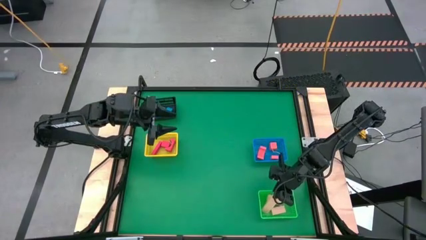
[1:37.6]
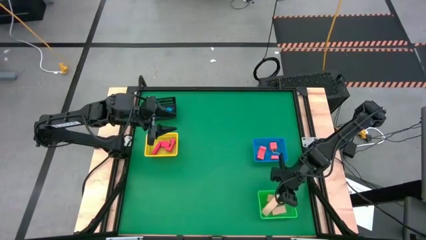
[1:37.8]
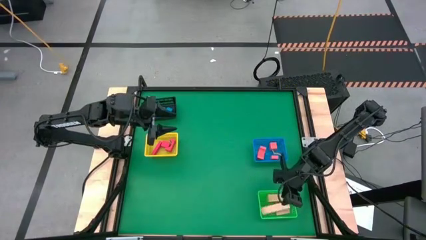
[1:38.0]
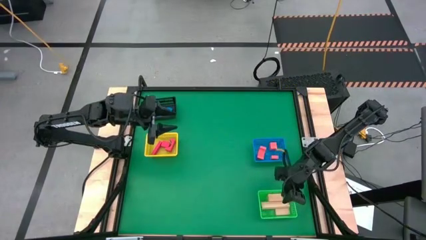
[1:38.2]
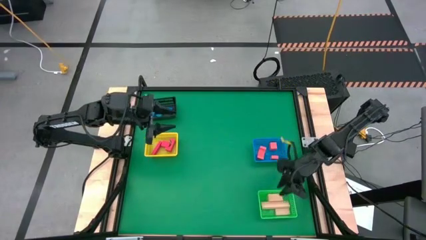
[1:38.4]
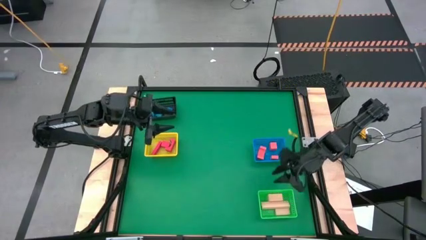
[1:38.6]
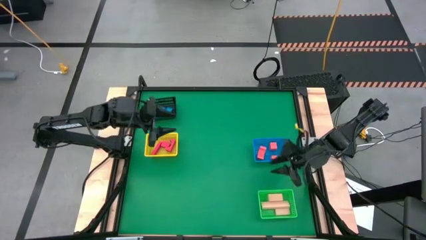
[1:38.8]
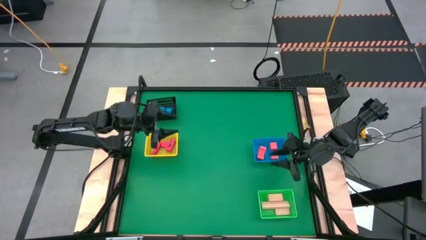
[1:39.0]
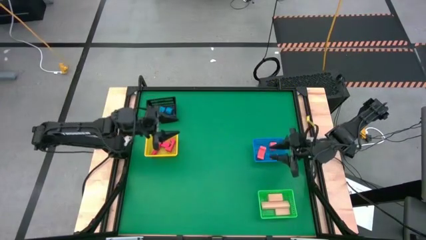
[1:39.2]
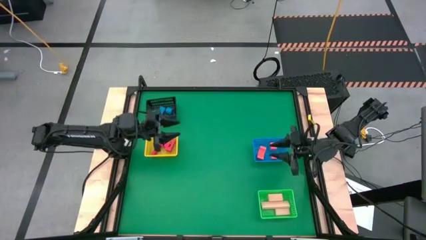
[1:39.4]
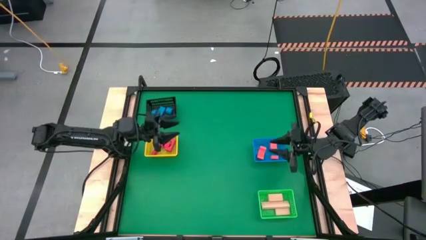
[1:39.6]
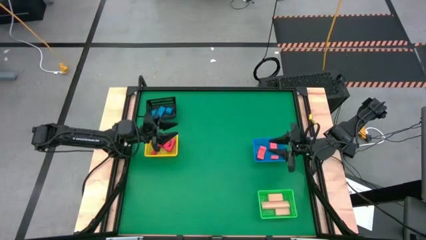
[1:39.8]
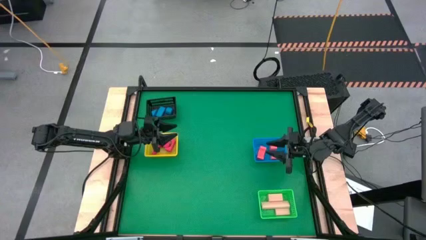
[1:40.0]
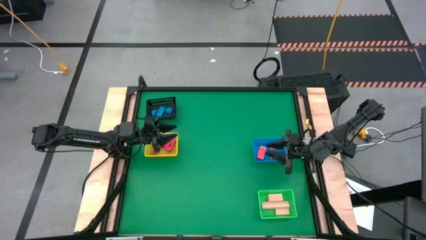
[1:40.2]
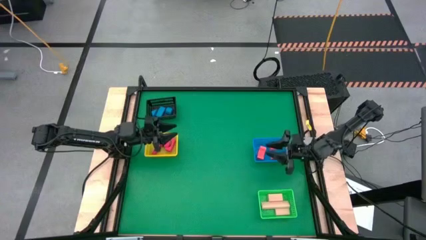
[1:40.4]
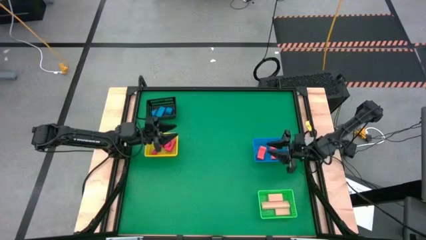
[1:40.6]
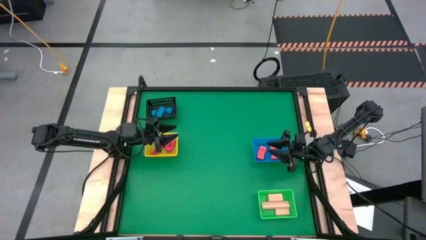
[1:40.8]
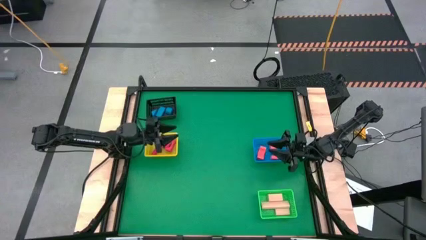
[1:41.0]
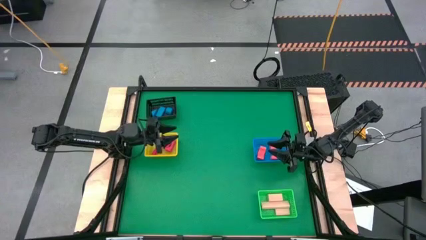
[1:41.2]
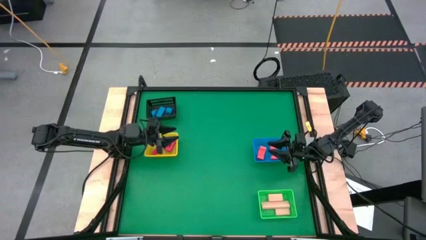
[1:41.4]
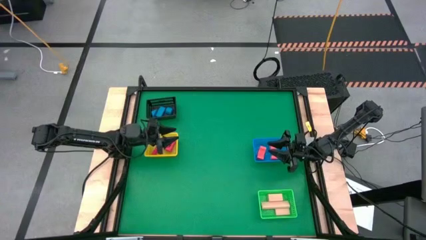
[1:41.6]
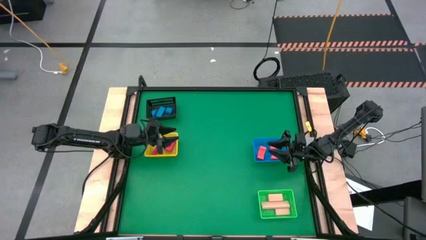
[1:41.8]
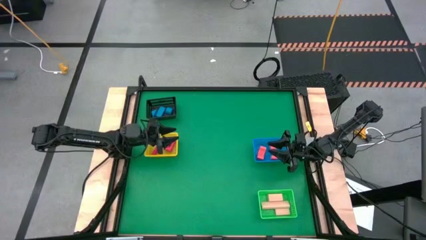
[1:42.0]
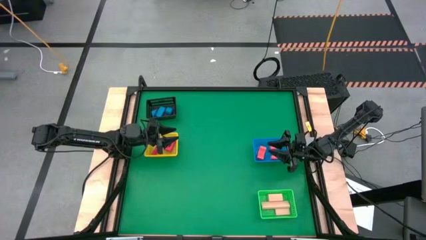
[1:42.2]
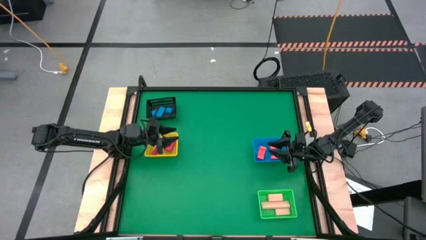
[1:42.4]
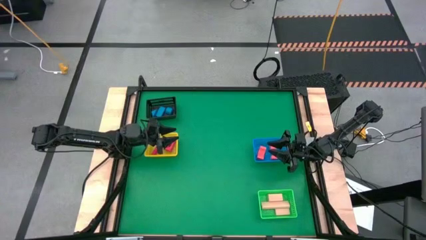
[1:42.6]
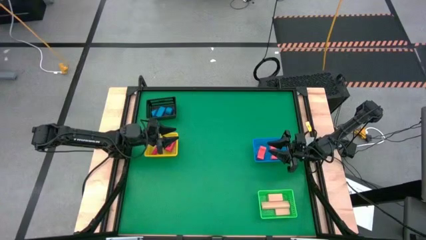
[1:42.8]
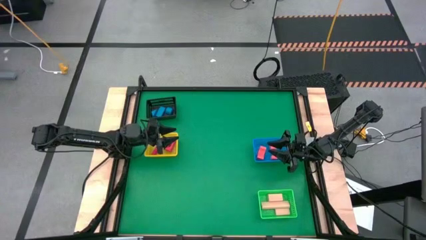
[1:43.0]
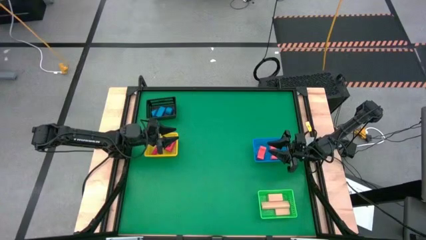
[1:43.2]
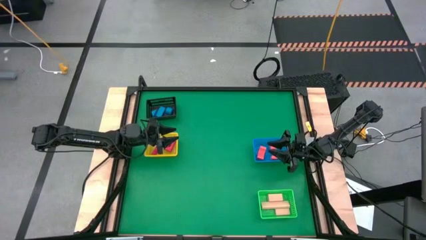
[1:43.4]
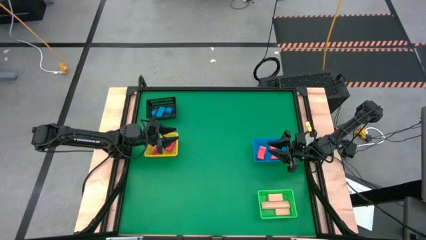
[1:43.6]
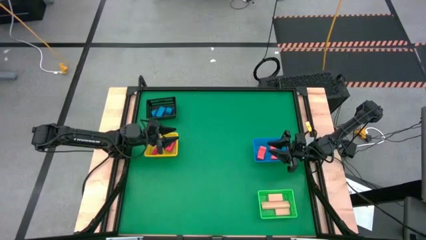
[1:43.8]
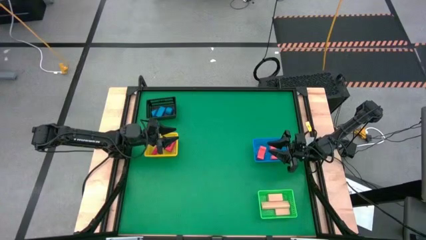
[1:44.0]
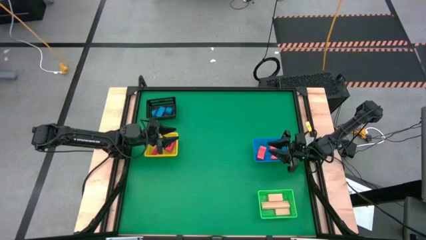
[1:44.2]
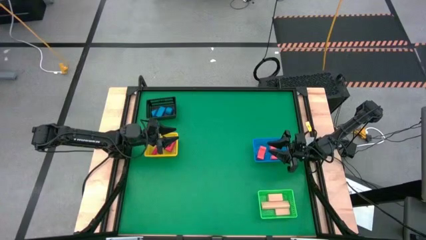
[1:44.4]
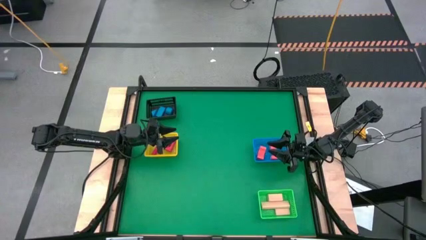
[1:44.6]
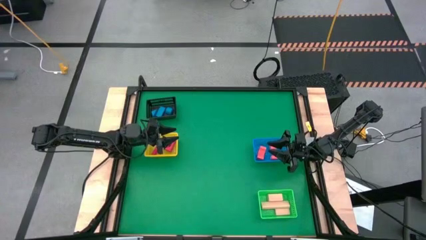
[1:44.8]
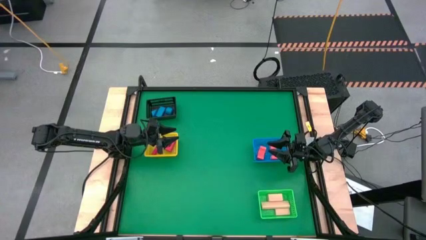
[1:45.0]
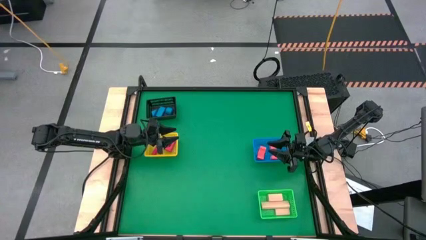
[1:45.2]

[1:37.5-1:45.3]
Task: Sort & place blocks by color
Return to Home Position

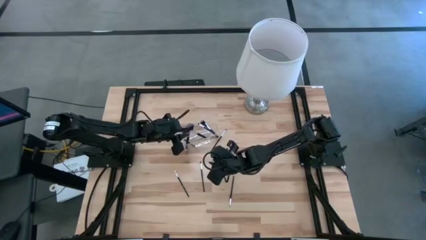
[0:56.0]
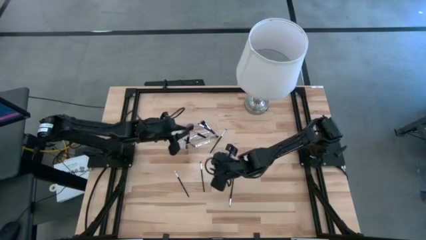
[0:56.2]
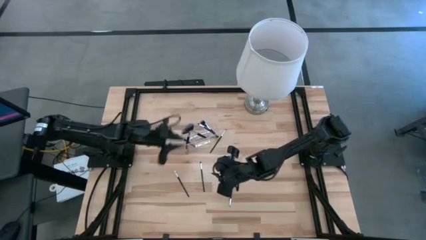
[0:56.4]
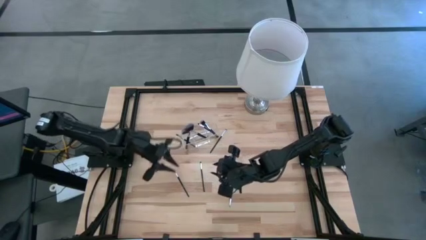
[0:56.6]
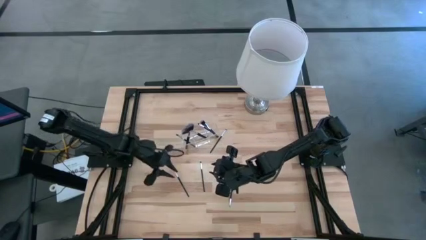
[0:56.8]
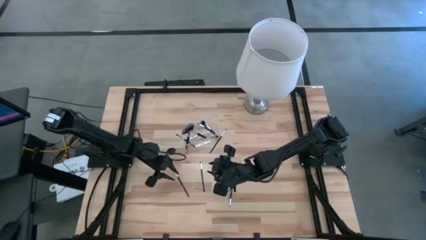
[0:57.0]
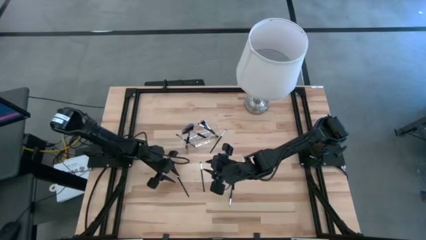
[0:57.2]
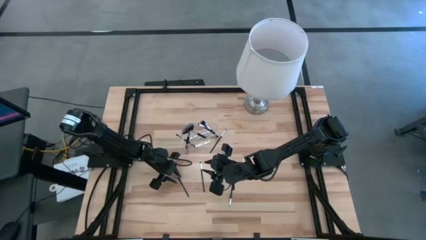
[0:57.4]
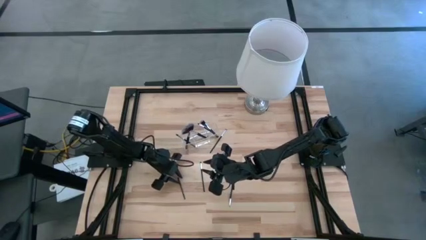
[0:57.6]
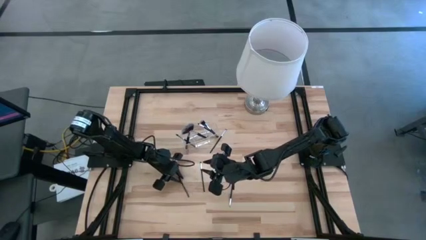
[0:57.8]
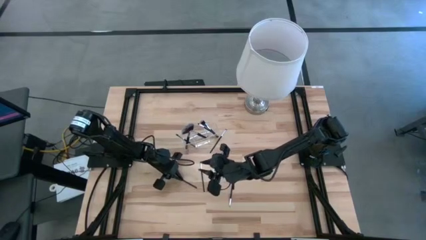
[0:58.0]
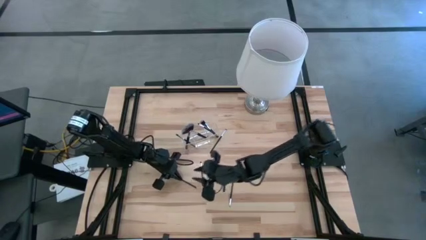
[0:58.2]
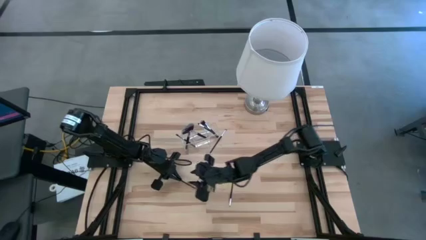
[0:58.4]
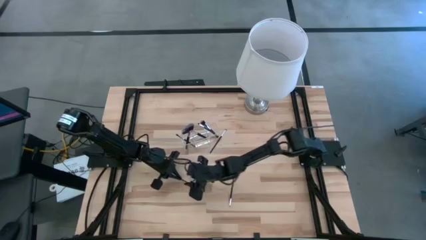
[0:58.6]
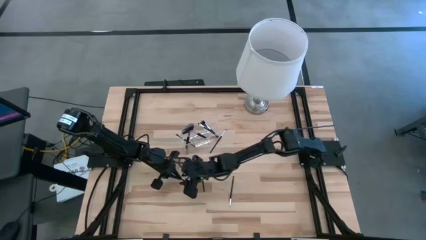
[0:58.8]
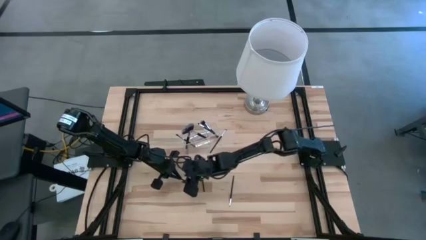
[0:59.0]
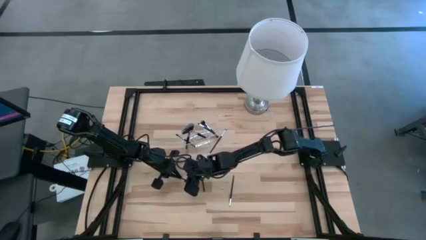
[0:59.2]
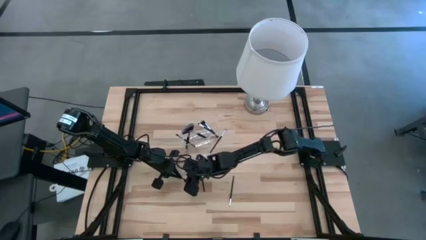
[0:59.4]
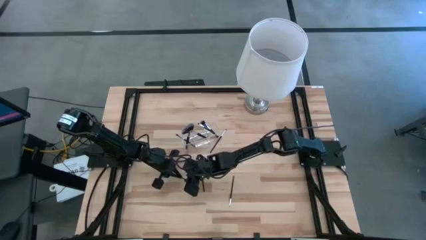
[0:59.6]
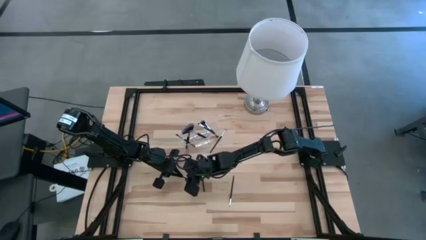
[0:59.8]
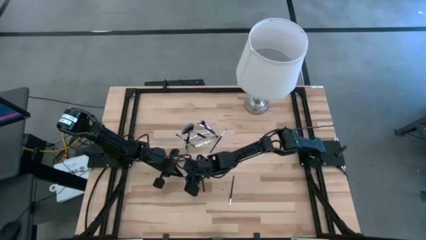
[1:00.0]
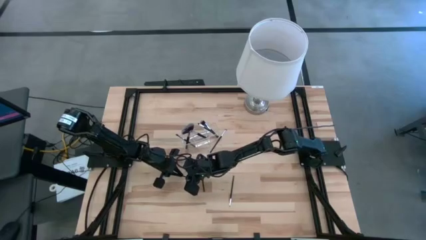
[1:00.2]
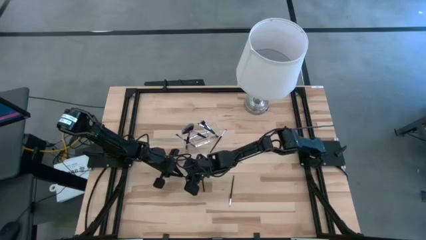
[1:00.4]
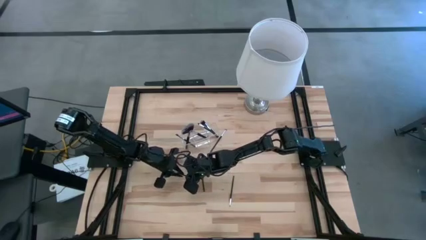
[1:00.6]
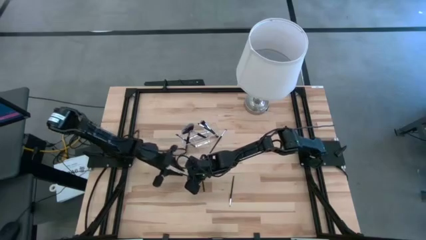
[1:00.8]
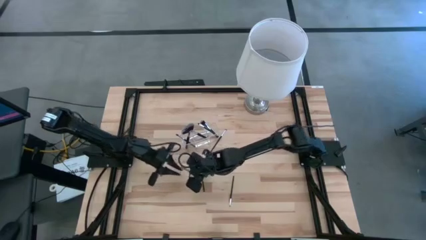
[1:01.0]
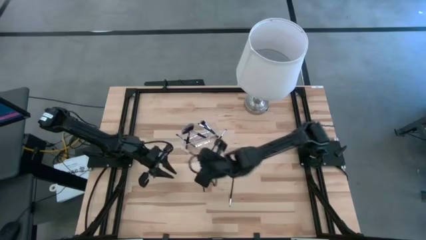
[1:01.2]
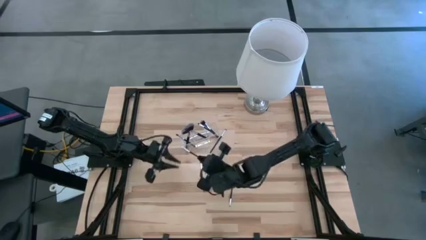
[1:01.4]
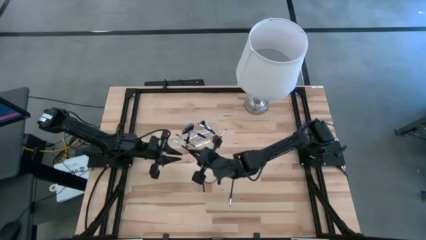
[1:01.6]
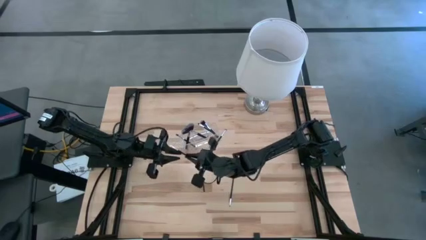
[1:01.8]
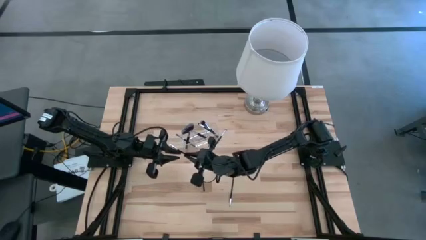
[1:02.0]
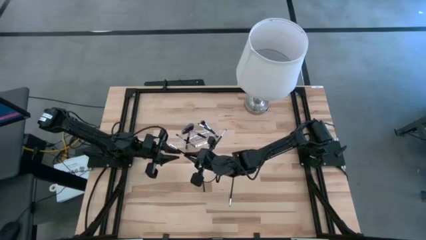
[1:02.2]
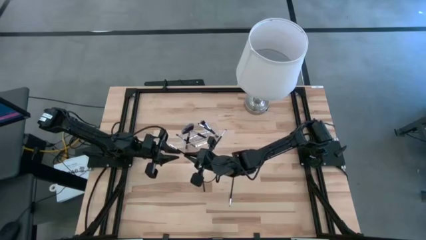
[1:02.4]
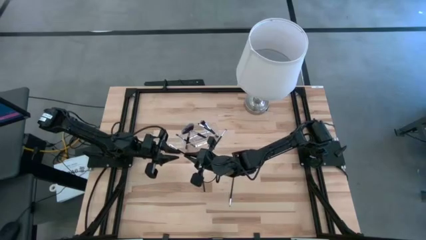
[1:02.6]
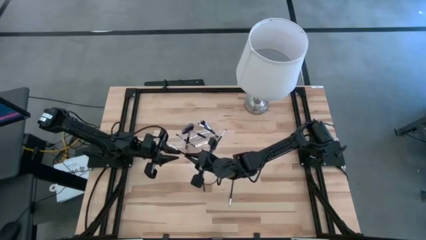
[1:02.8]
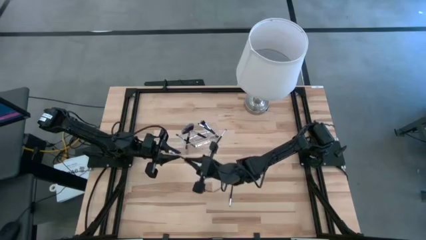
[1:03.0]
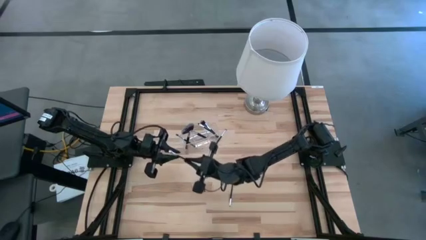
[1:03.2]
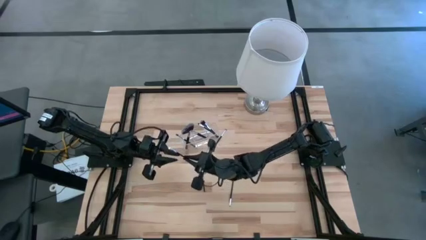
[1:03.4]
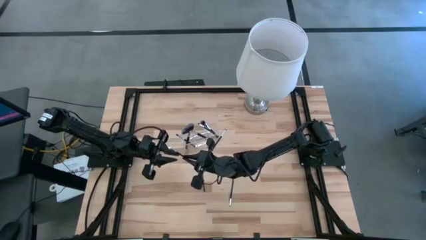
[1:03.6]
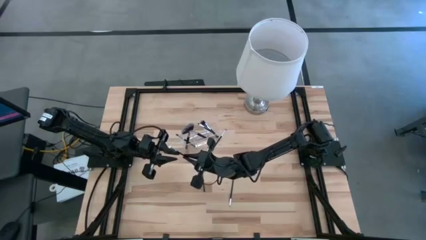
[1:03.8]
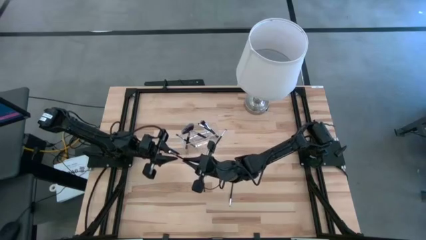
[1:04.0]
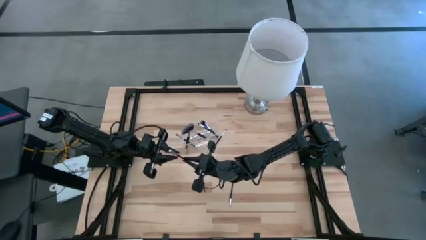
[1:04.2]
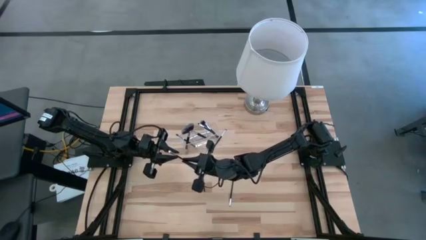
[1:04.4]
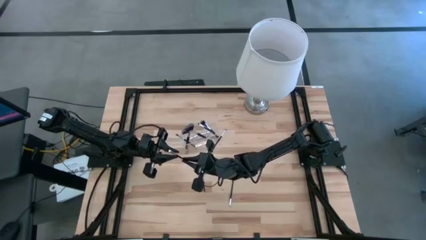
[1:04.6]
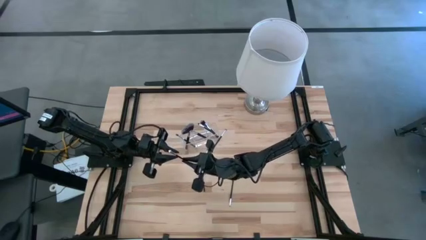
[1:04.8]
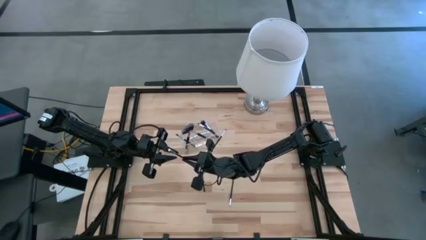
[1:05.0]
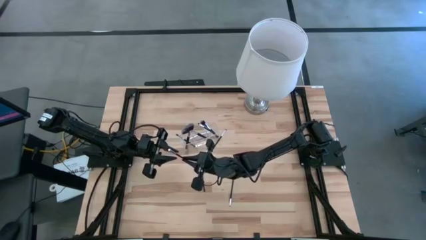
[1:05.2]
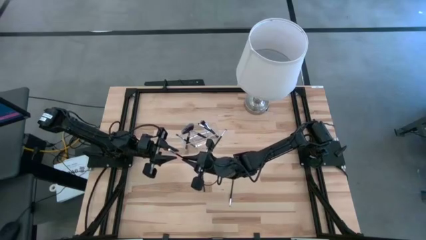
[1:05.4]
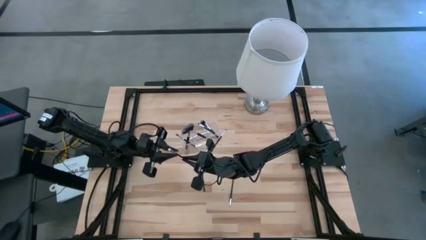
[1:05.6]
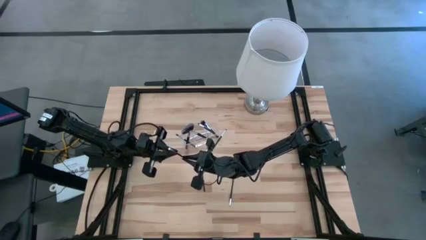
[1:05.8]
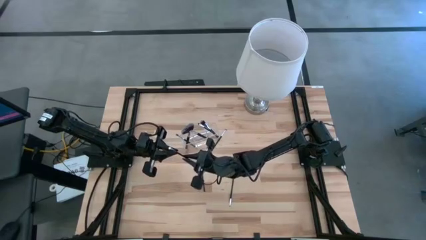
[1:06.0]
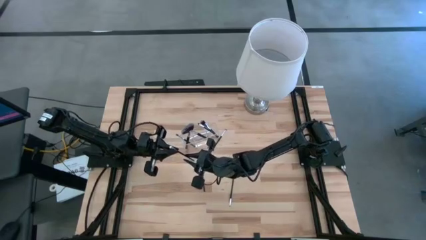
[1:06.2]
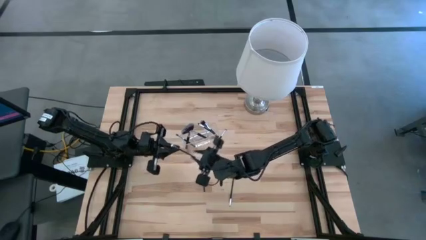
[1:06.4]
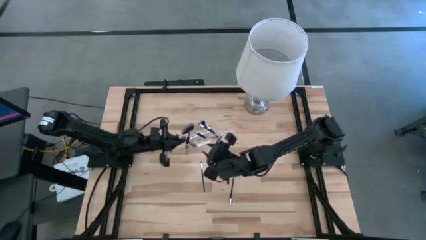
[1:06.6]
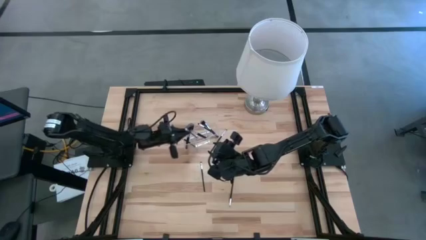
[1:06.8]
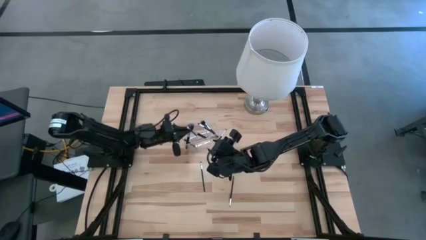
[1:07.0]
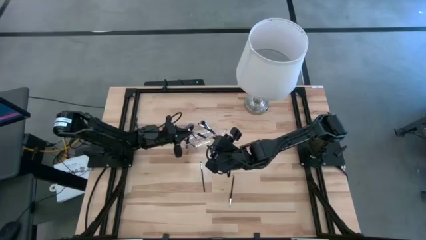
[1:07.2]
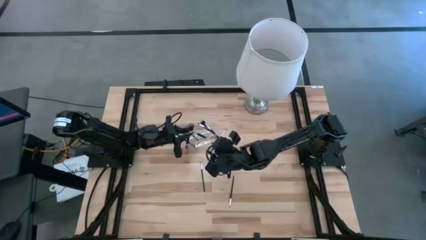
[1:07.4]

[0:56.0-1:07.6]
Task: Put items in baskets/containers
Put the eyeshadow brush into the center transparent organizer
